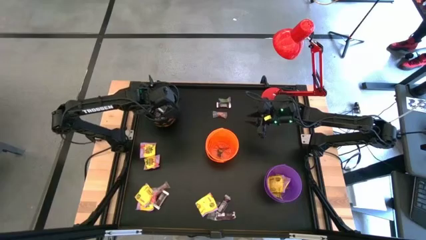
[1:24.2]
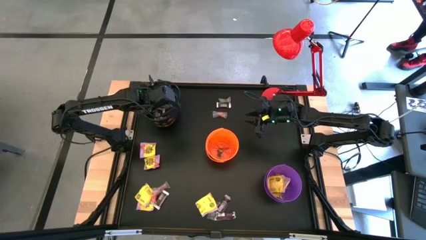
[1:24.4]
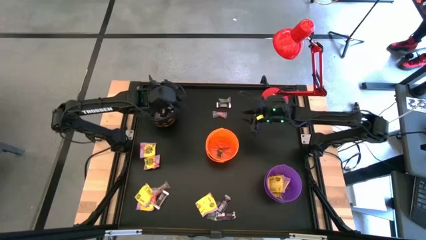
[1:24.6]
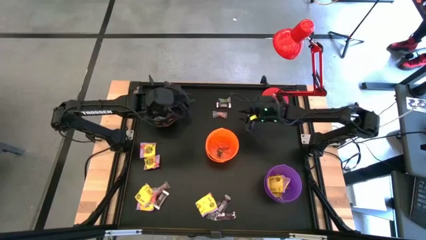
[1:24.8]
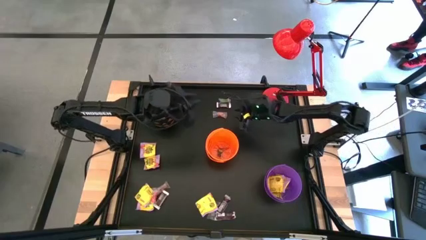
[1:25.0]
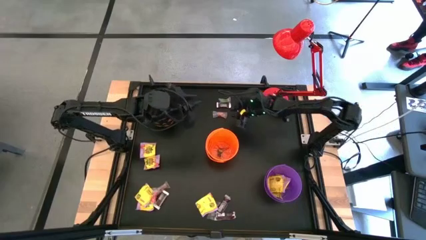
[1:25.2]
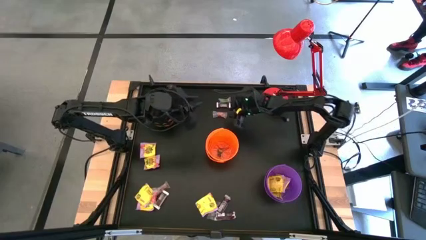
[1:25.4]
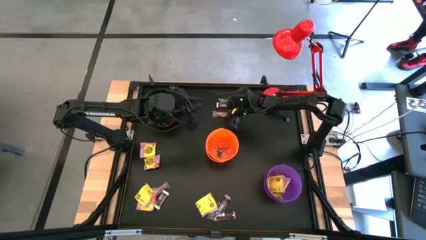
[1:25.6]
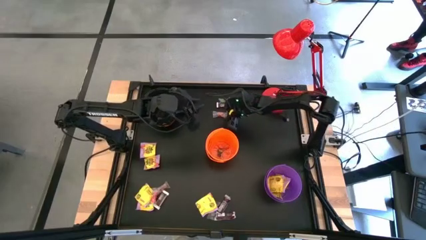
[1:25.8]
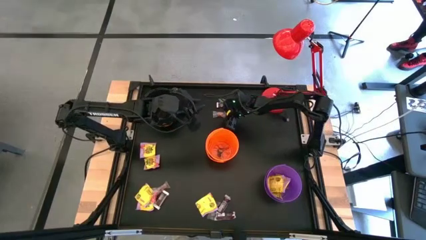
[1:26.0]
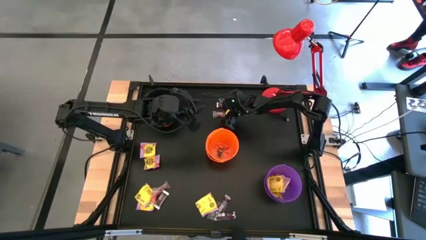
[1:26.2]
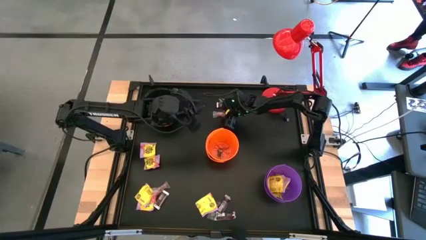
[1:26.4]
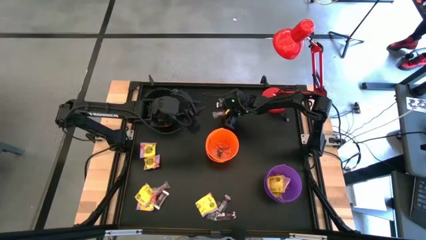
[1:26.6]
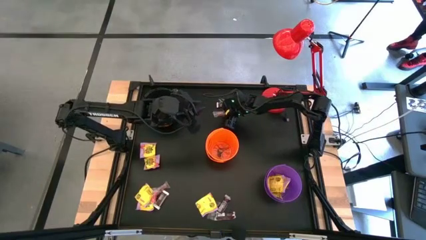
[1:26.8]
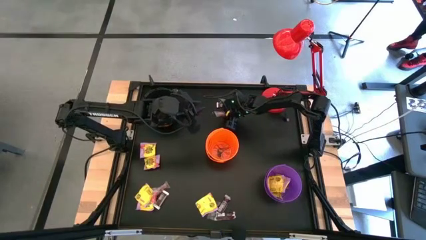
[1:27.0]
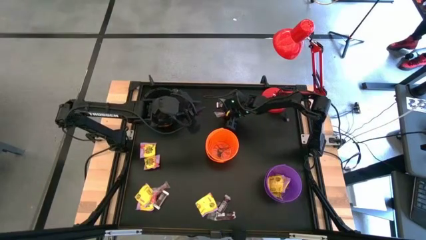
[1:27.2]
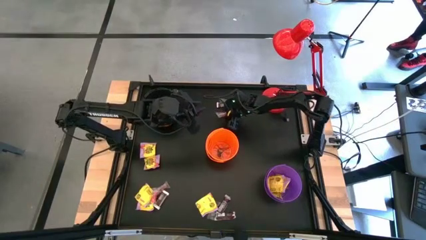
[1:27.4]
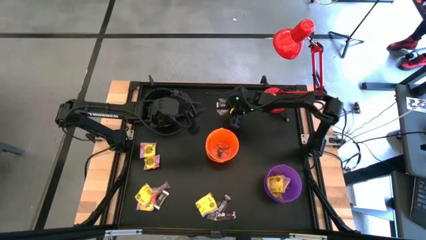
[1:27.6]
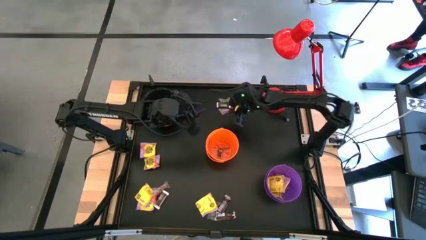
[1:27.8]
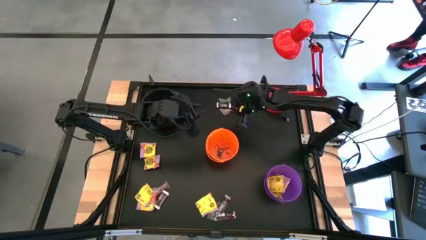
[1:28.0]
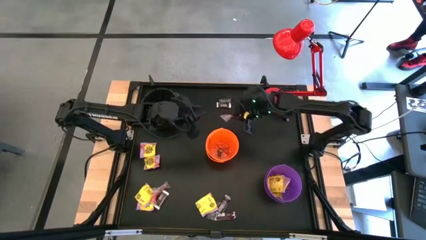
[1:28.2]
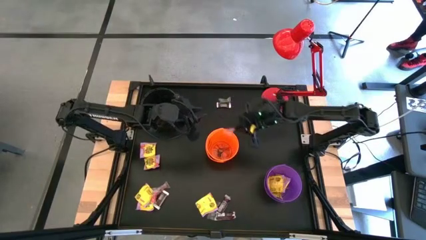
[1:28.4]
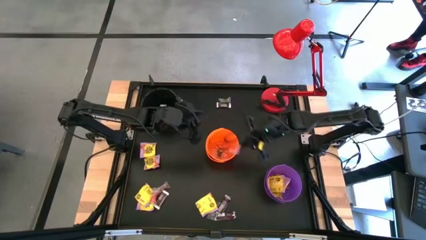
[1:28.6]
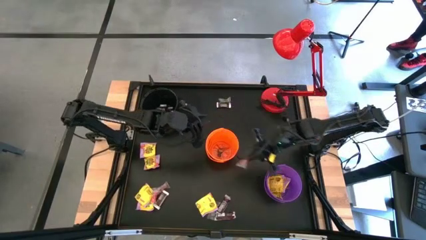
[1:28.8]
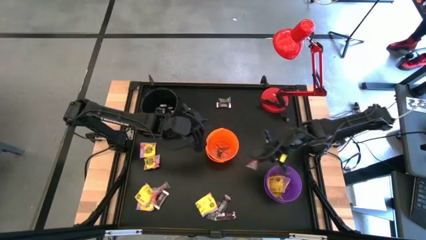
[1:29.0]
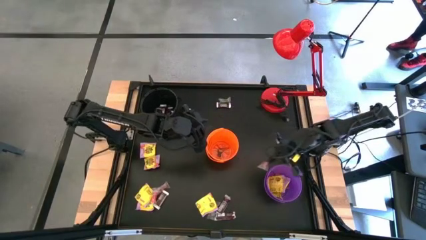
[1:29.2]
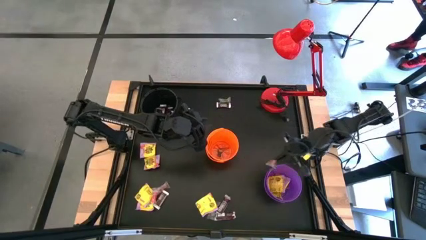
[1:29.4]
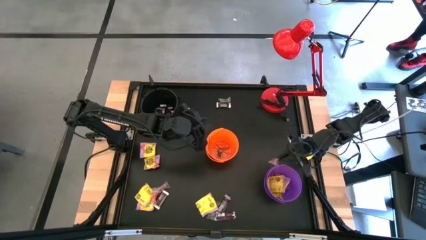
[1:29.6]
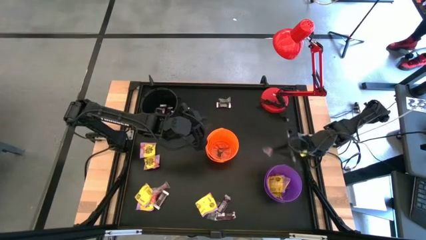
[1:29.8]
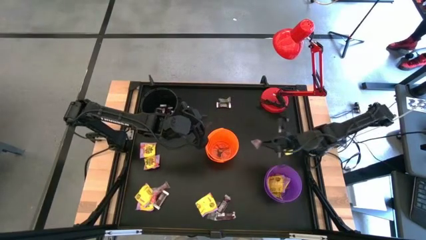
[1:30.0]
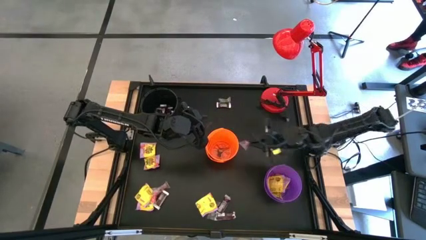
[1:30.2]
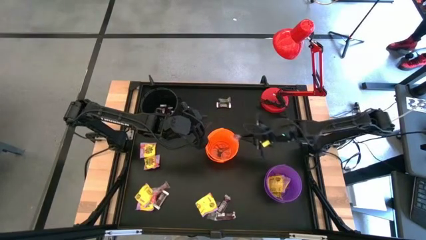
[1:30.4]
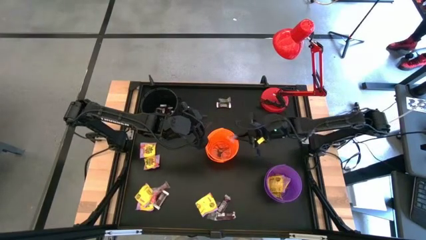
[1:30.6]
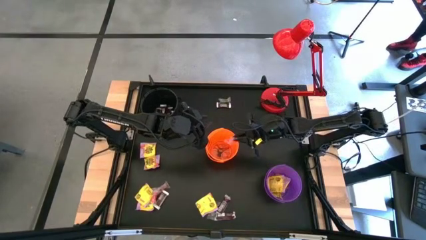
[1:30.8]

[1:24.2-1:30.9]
Task: Sort candy
Put the orange gummy into the orange bucket

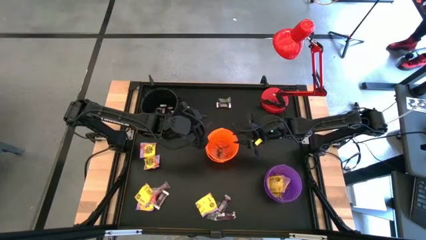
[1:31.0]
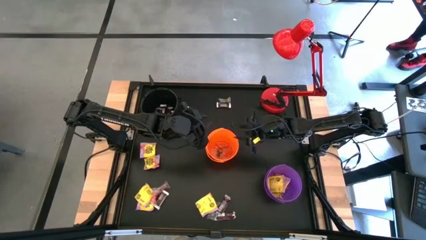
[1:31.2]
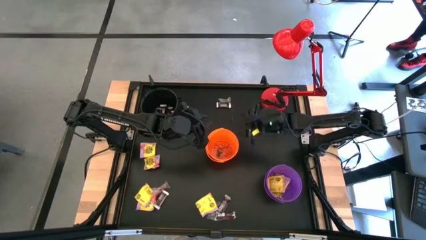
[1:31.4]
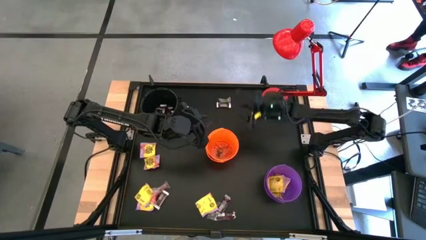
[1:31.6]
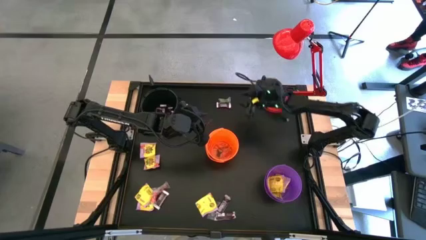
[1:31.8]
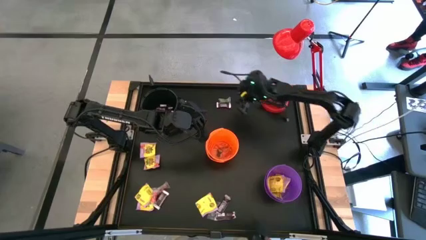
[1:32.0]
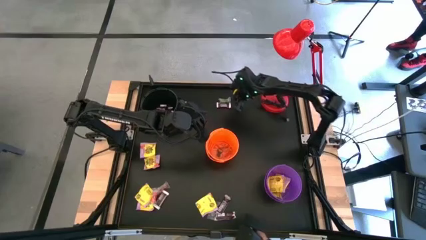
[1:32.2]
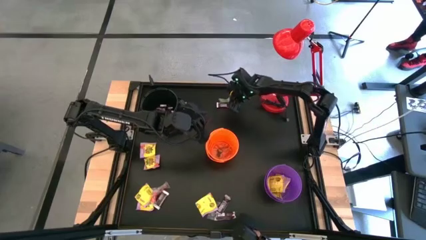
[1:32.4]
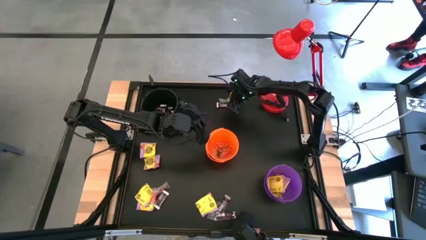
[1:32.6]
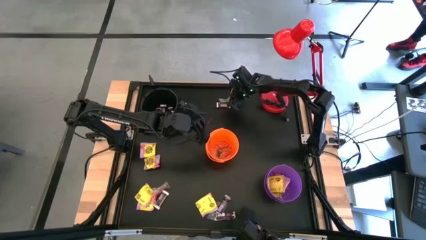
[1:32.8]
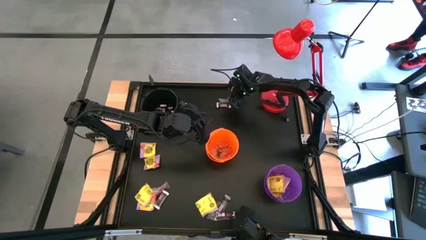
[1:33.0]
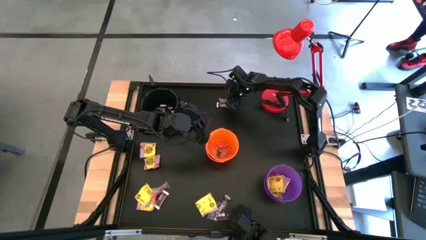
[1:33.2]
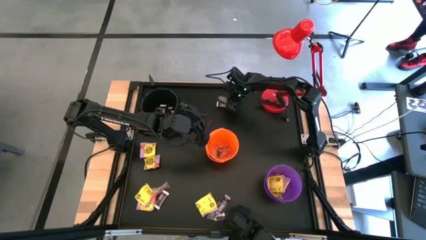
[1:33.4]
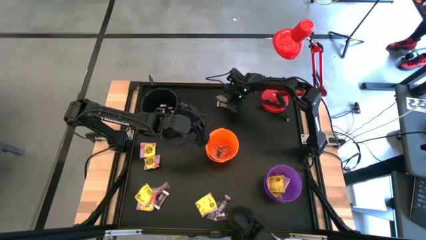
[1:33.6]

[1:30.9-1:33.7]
Put the green gummy candy into the orange bucket

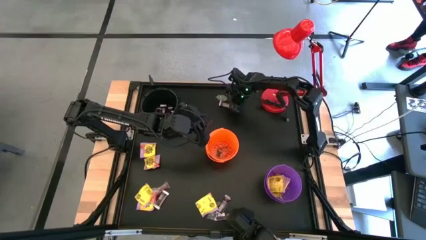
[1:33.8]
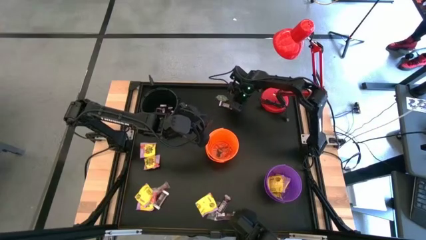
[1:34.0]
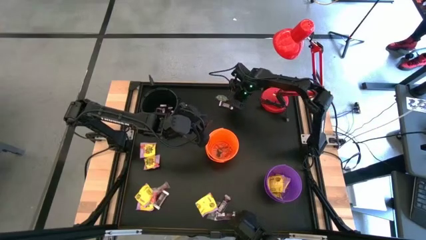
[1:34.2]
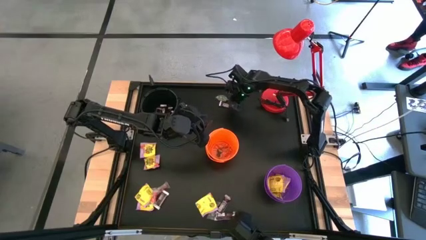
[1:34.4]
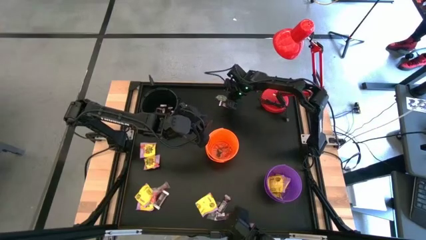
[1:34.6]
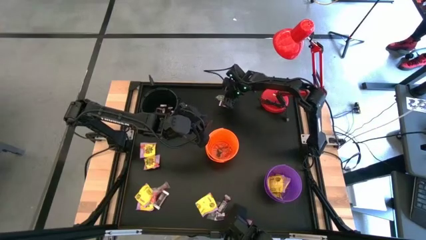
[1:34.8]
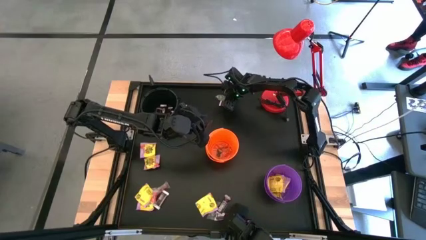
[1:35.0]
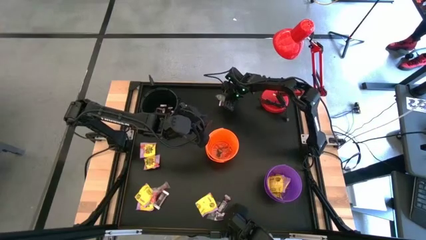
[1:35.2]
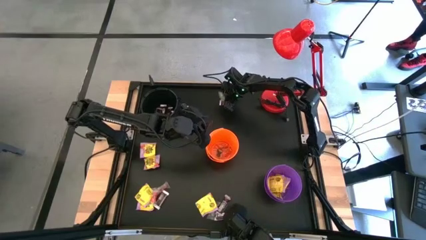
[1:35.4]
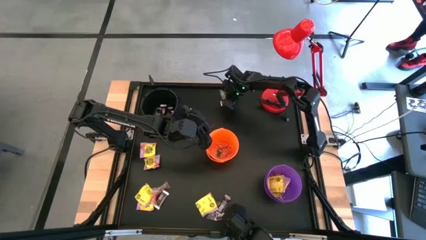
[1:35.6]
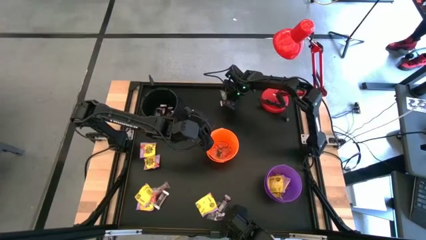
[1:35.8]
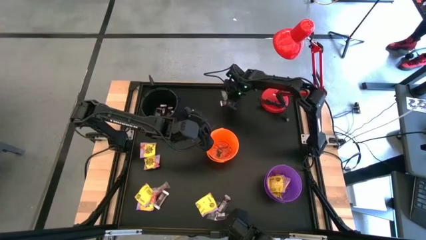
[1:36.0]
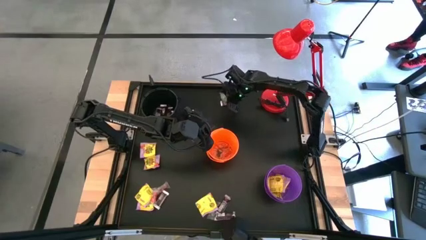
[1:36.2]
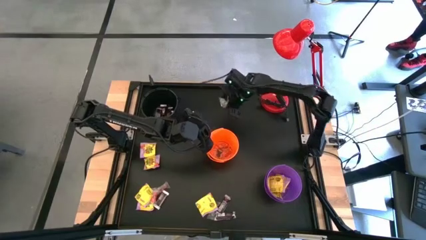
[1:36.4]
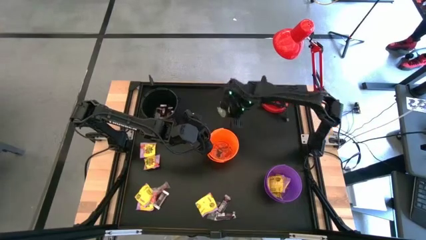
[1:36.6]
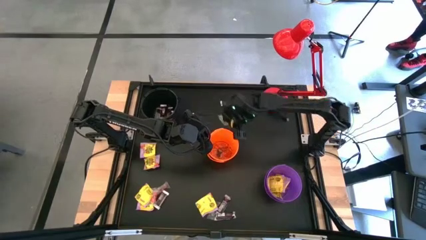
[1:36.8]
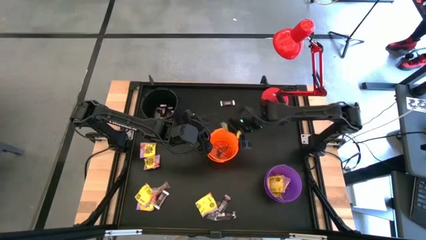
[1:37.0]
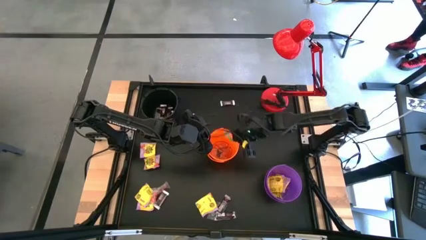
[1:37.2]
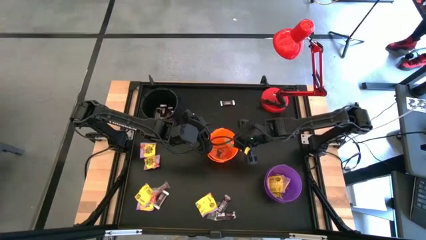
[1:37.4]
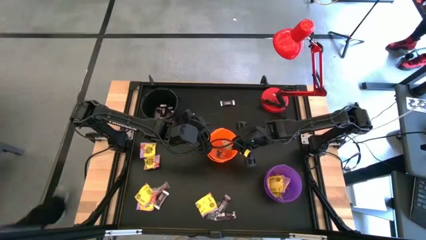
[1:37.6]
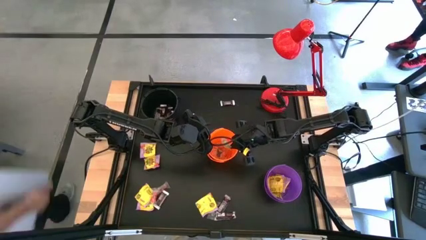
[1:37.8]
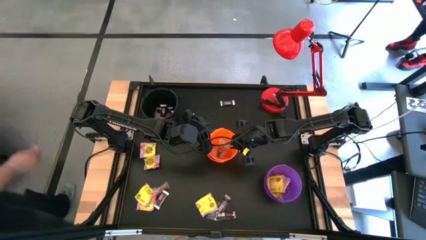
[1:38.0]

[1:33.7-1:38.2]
Put the green gummy candy into the orange bucket

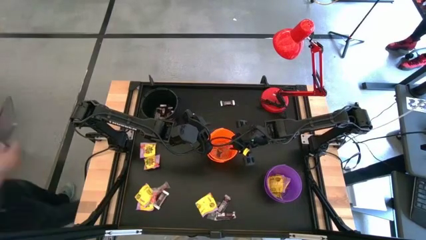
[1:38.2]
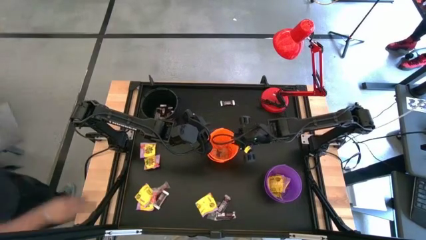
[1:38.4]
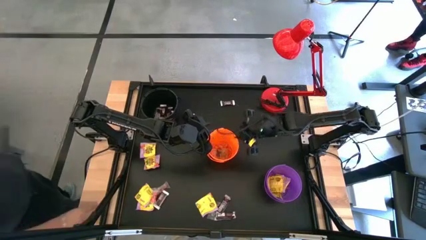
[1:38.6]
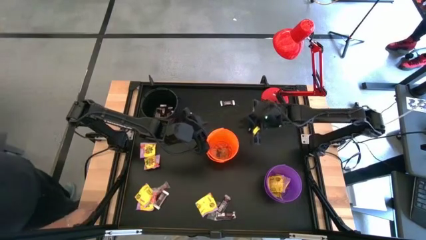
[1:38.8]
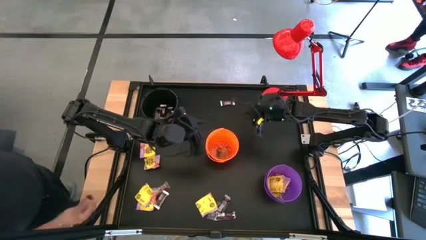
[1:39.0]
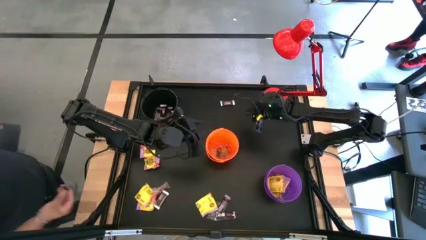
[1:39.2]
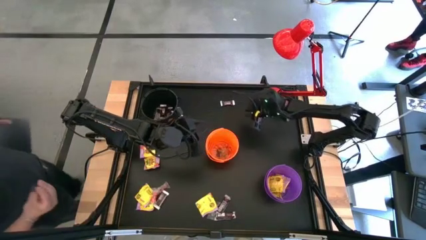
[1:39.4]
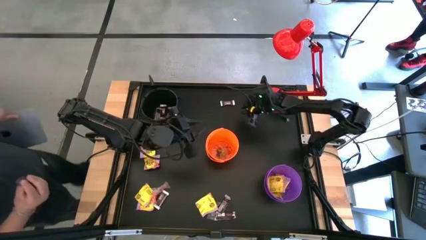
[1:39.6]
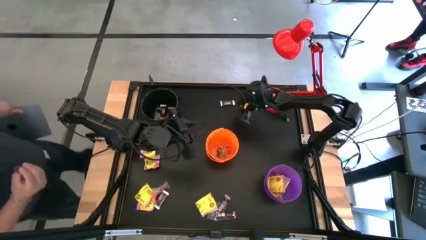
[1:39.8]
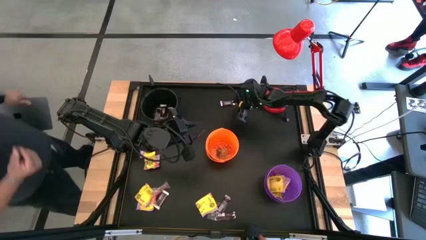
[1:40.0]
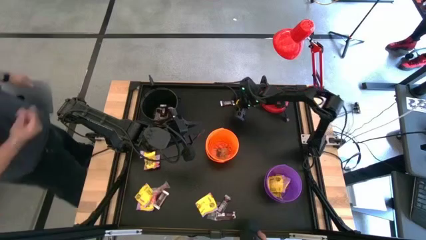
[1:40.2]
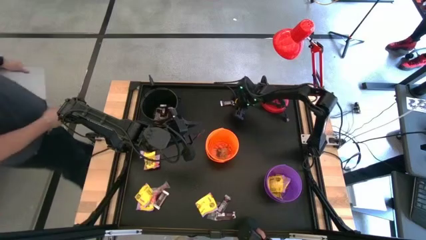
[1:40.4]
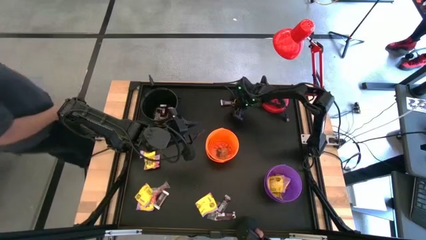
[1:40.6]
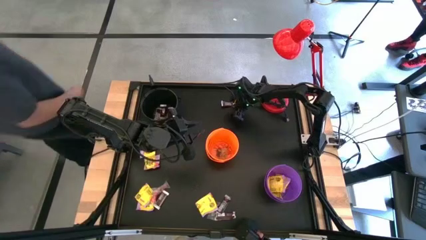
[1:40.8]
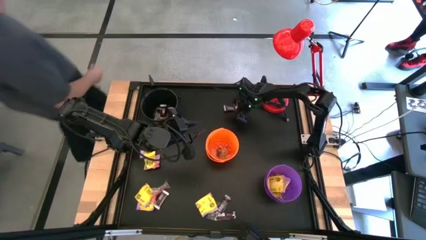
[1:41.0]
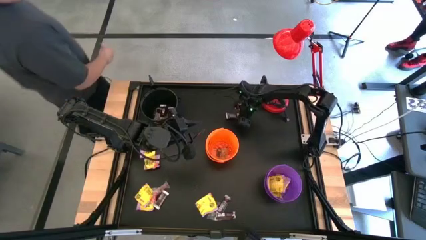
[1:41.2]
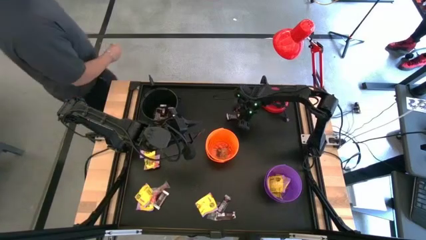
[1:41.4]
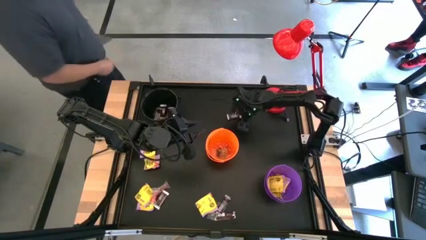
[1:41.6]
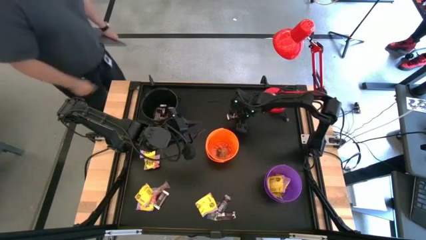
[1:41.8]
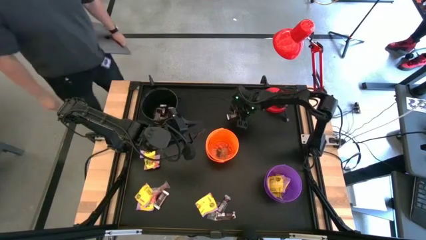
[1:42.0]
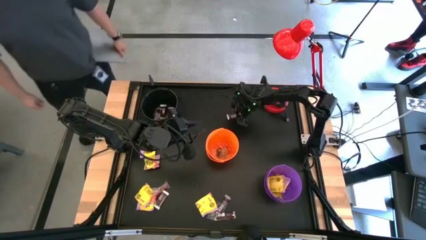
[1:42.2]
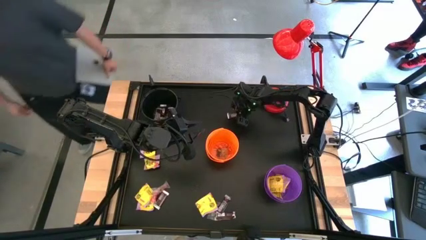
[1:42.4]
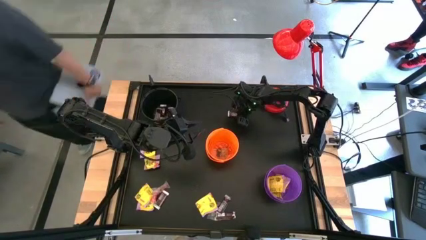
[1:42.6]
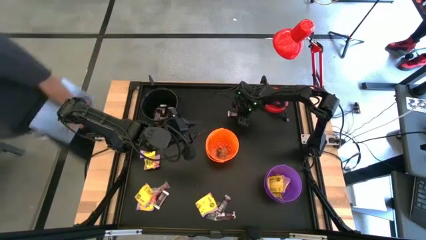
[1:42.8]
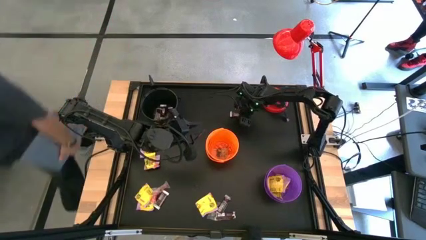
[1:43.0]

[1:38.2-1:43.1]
Put the brown chocolate bar into the black bucket
